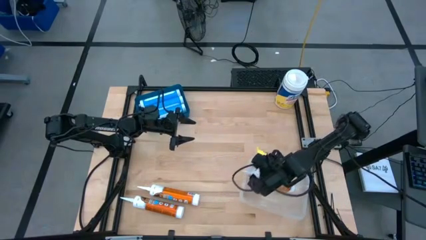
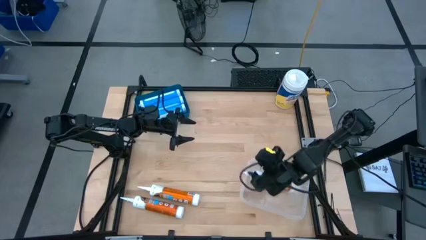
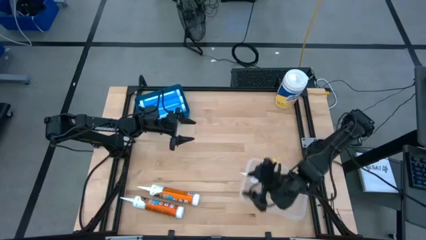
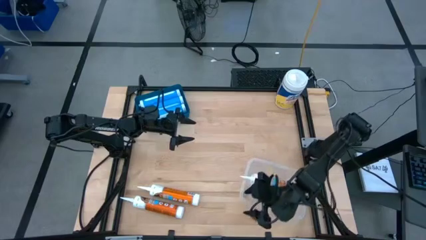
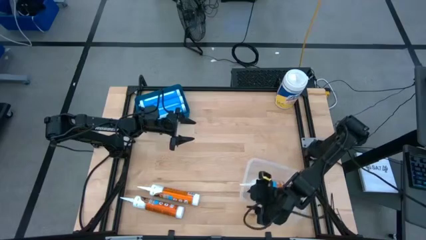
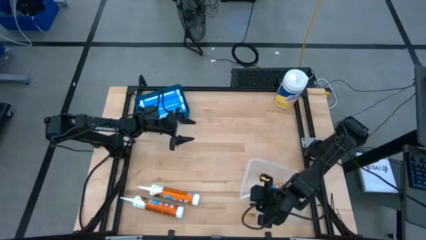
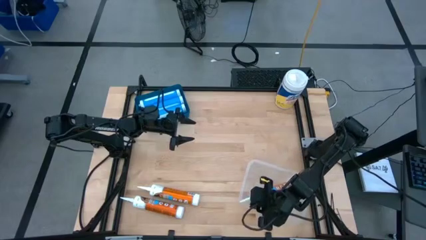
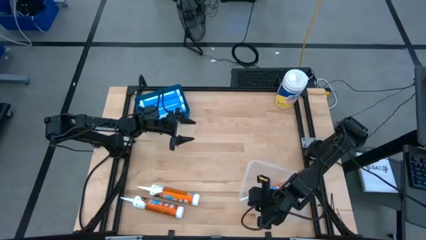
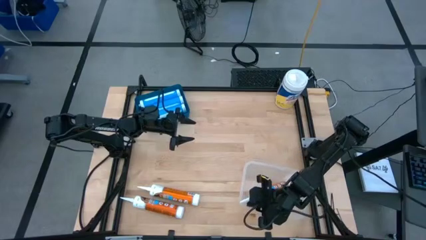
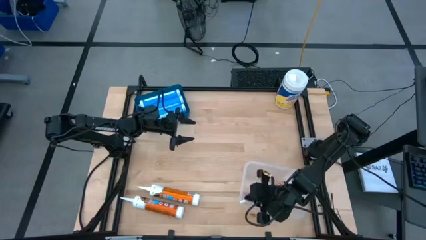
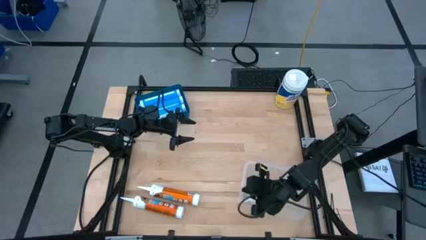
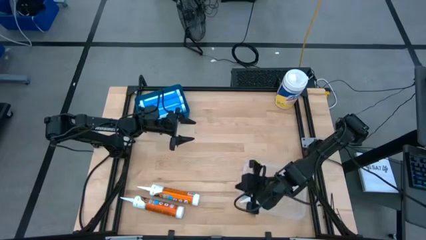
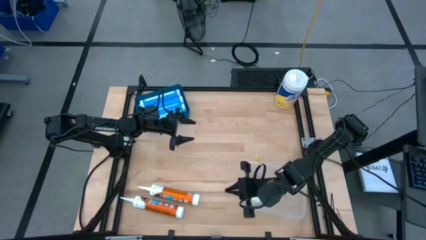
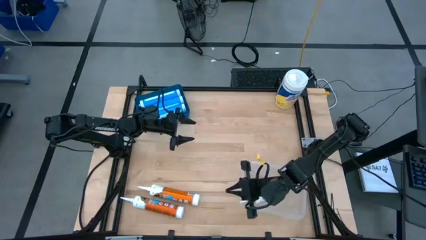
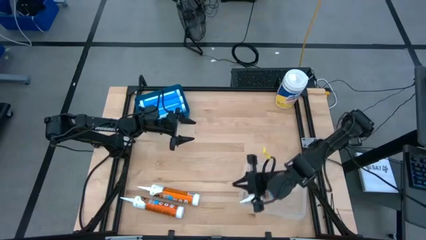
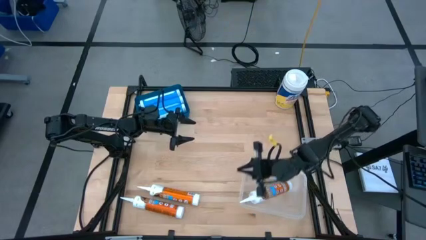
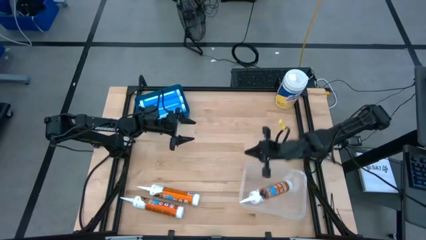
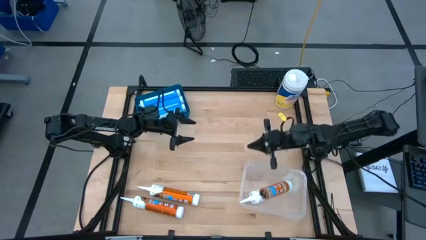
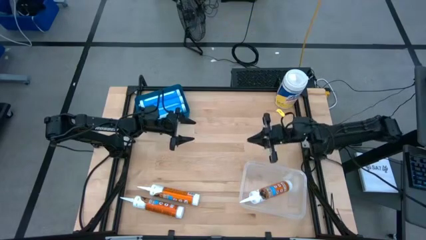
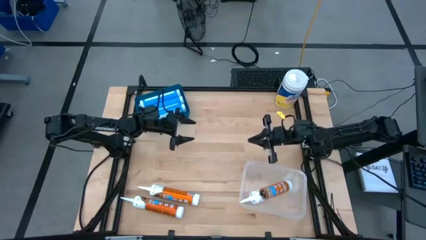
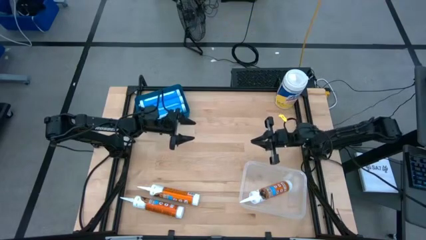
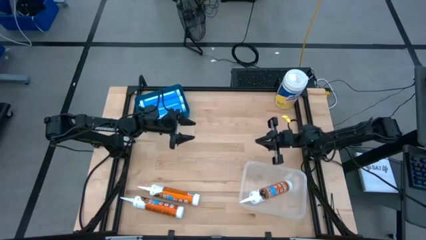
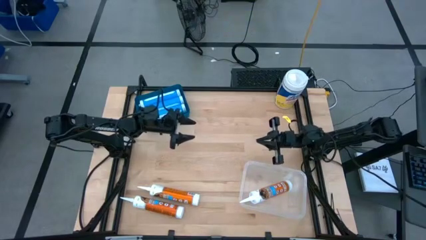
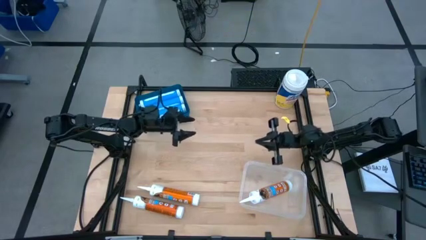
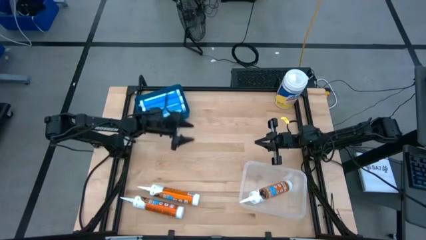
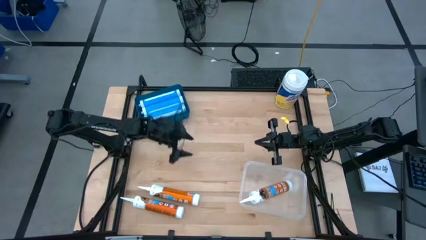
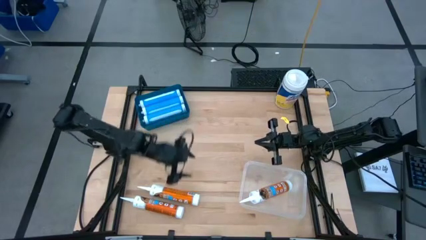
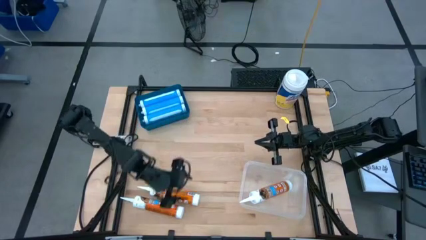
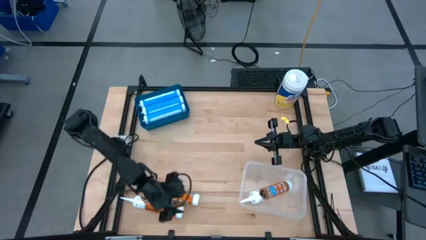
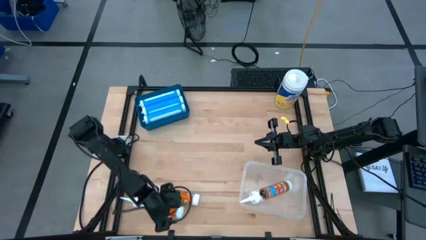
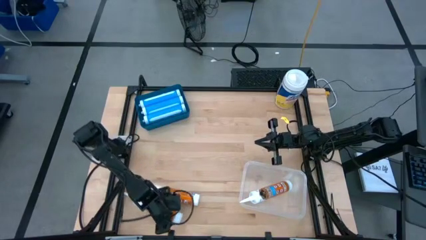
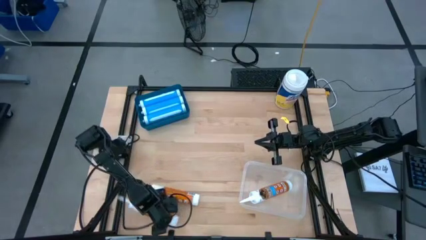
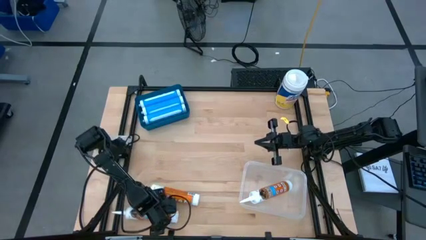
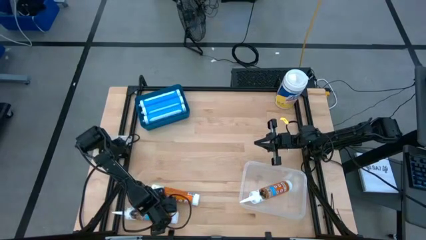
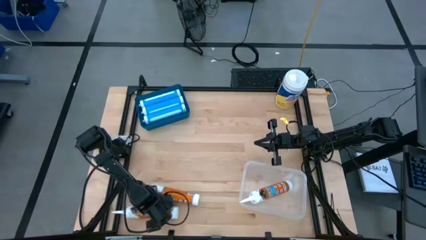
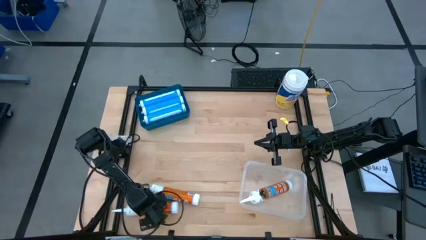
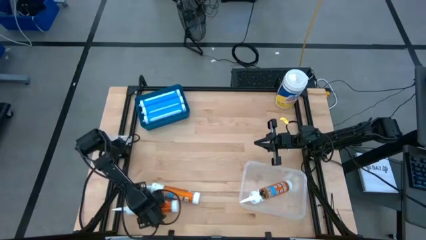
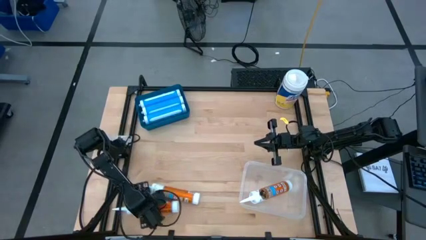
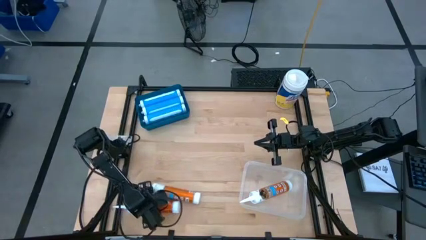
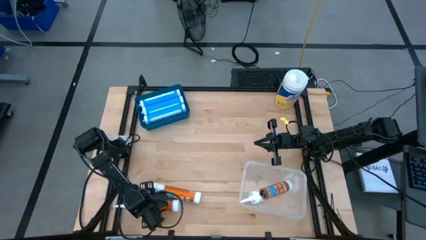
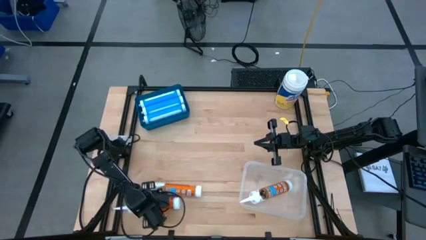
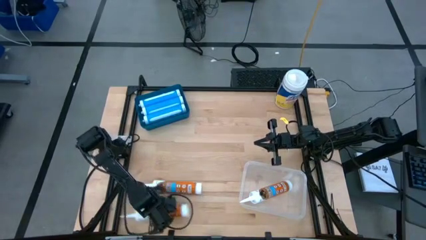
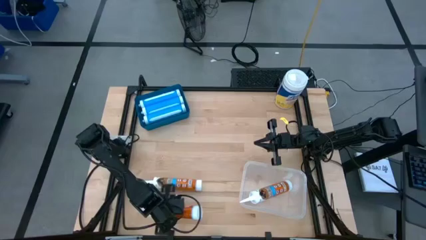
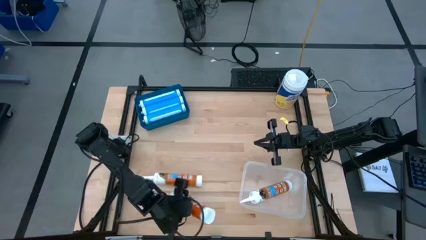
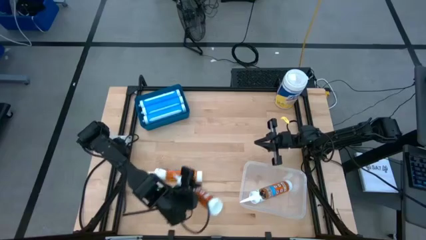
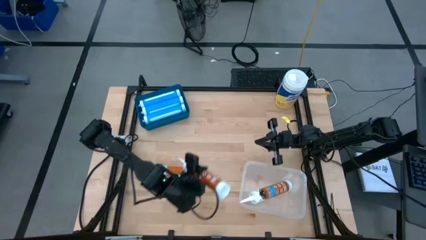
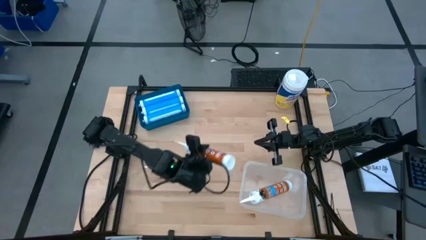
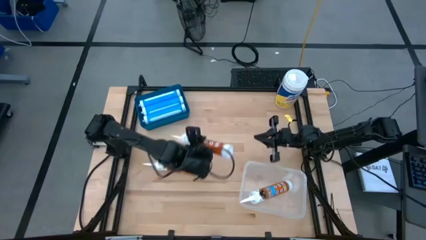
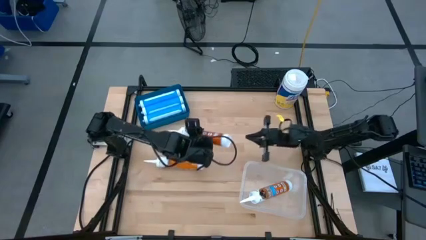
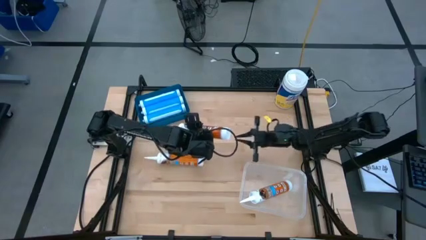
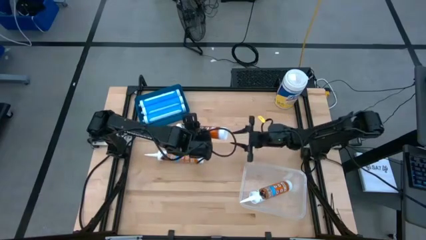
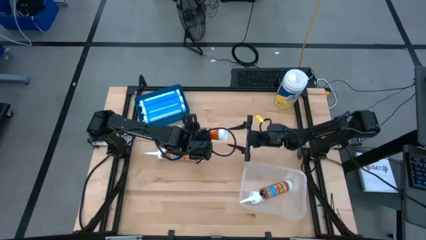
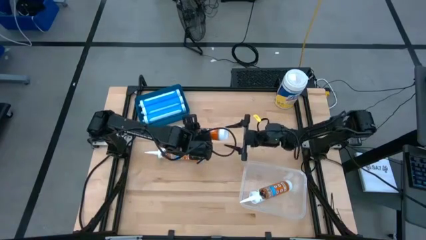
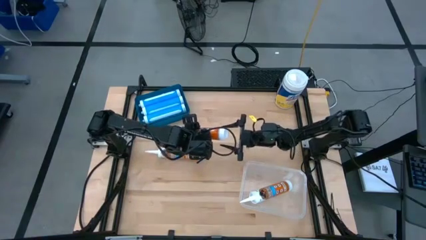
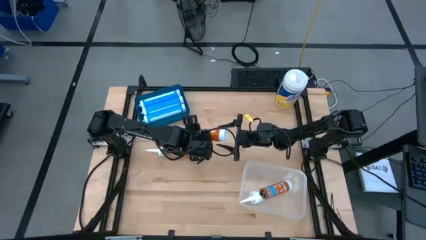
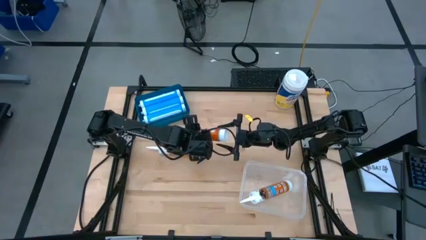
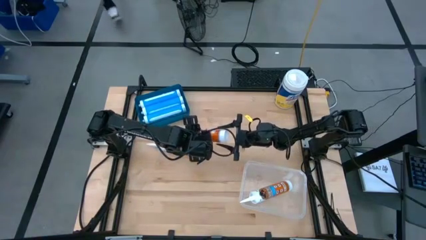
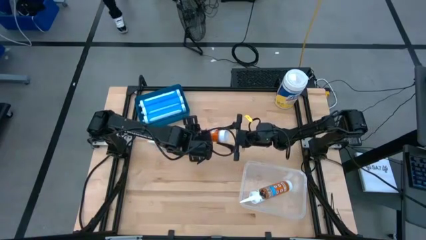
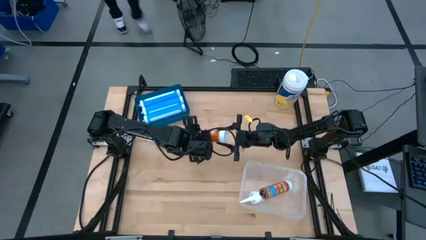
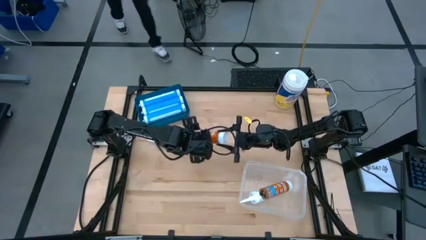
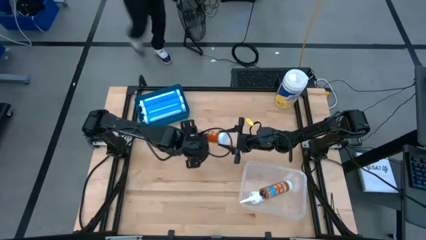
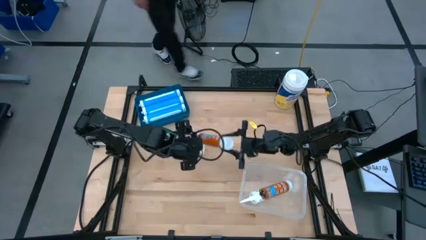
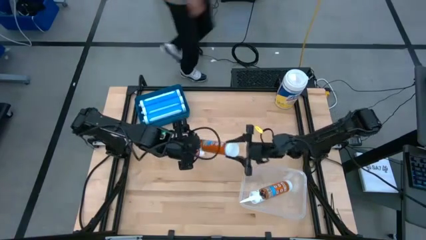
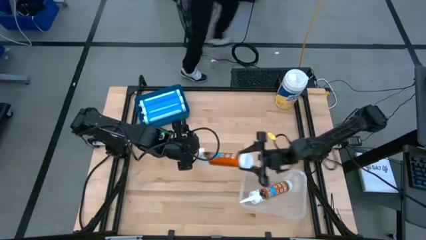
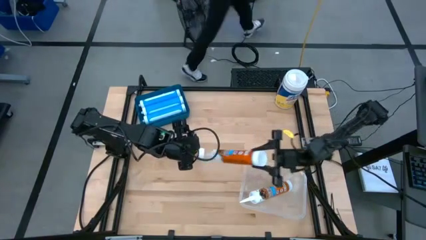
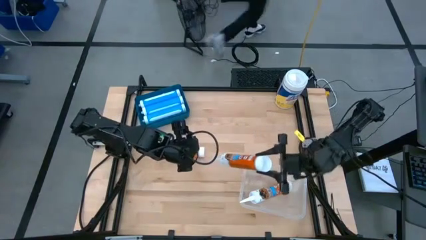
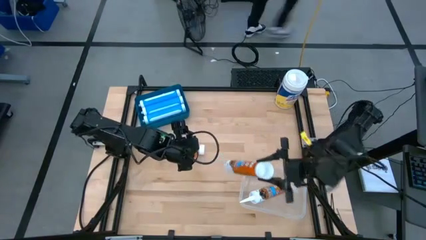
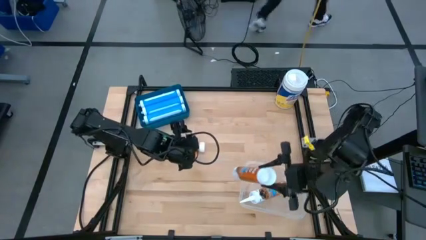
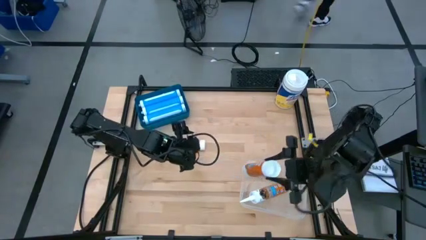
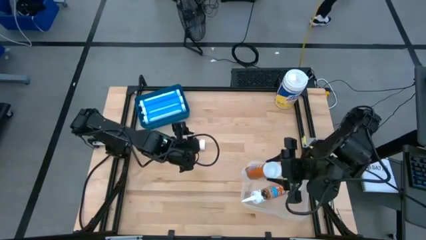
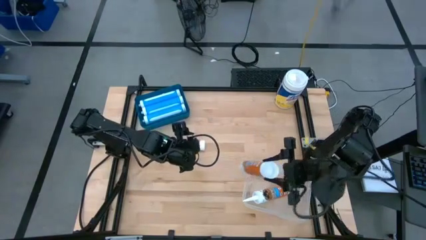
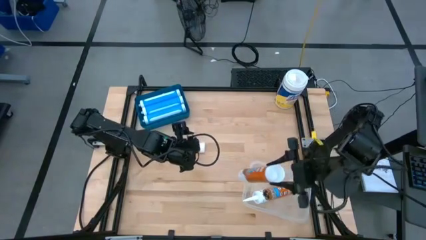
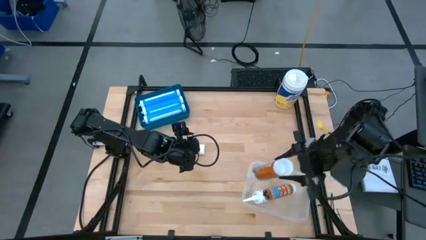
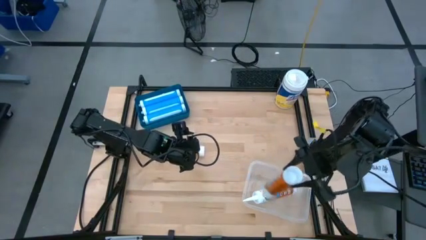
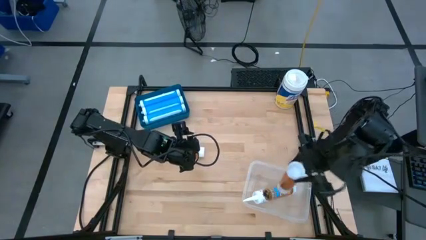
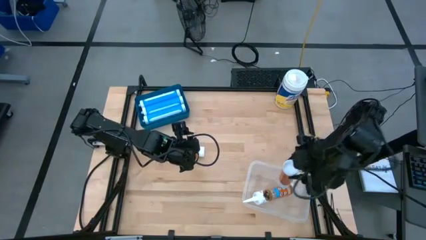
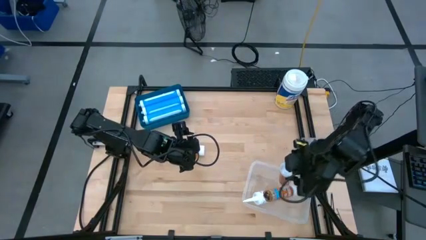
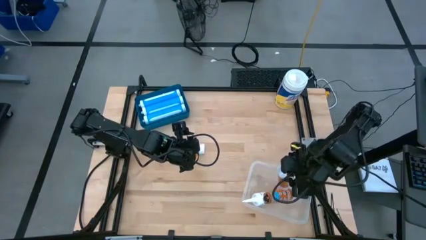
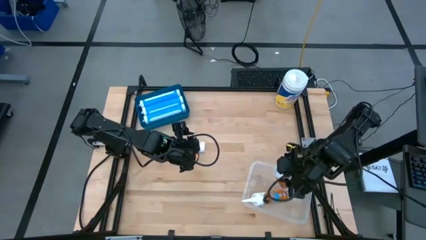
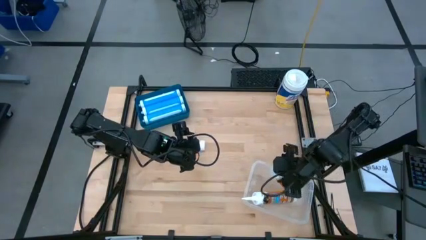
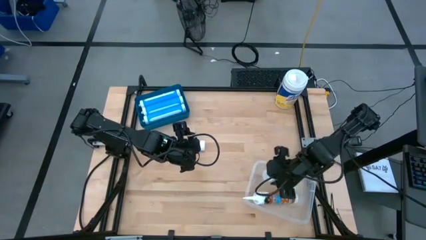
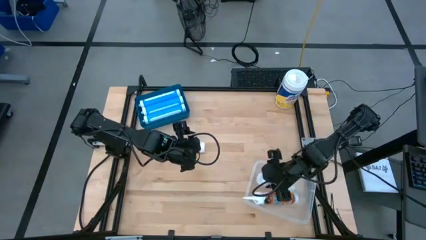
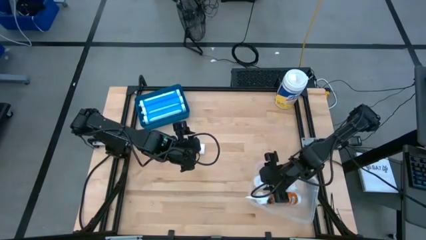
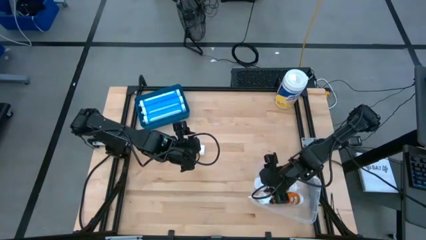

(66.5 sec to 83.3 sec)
Task: Pick & place silicon tubes, Sealant and Lysol wipes
Put the bottom orange sealant into the transparent bin
